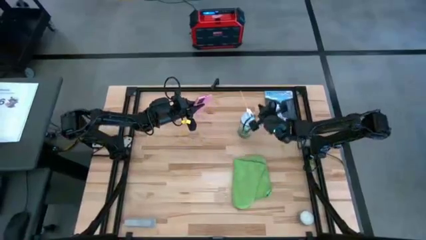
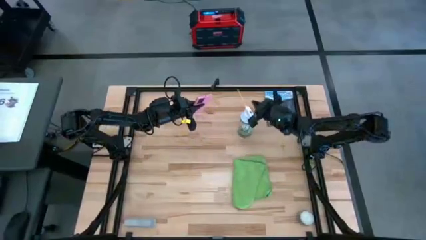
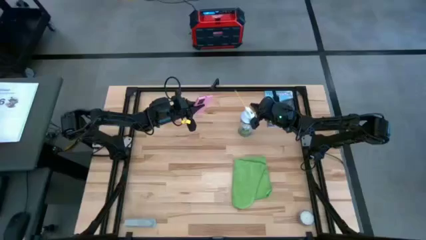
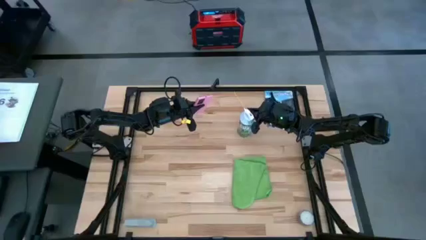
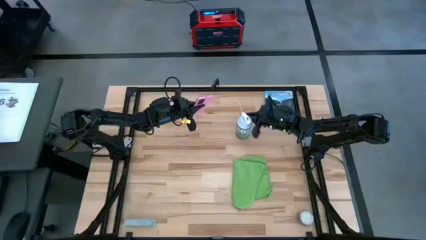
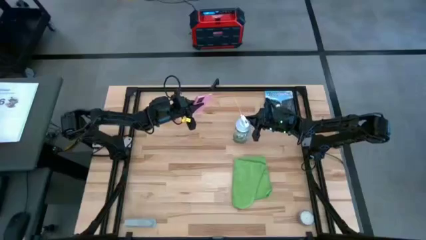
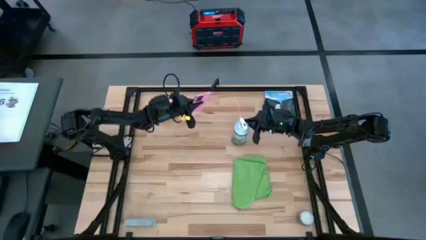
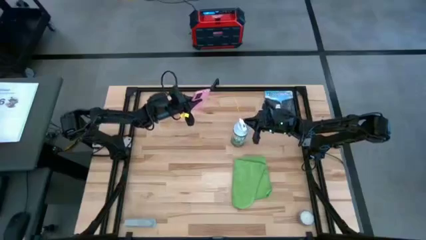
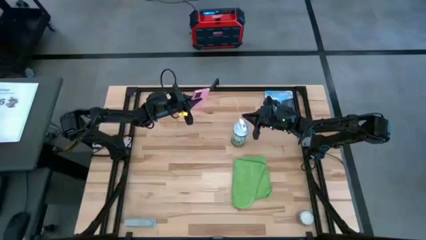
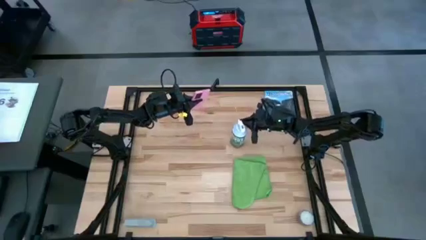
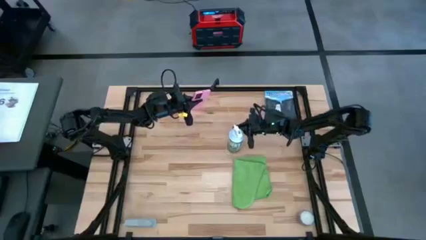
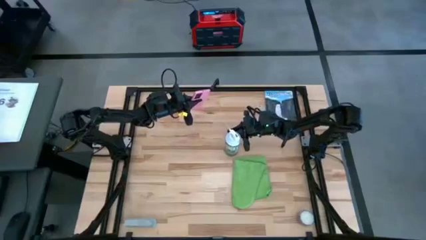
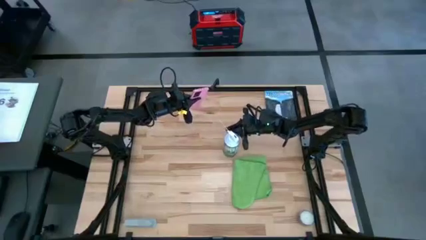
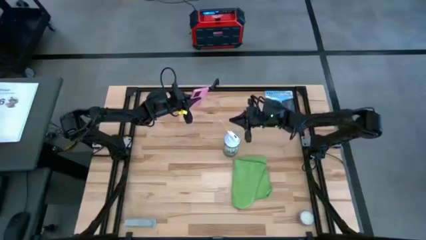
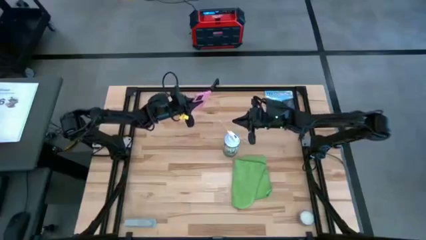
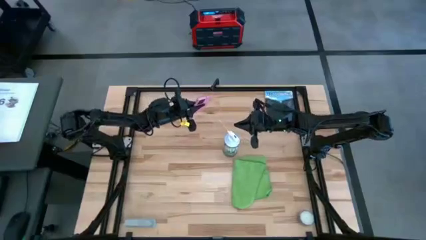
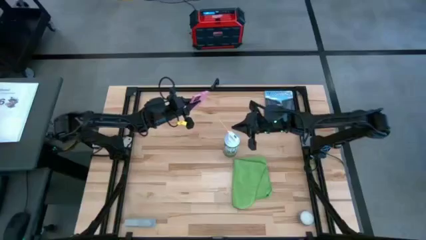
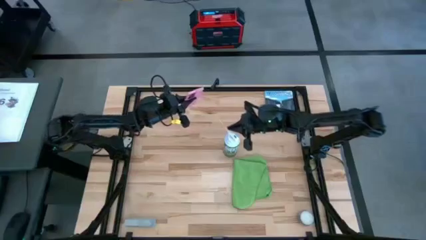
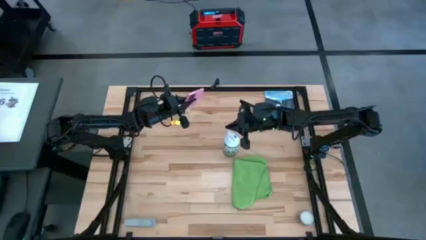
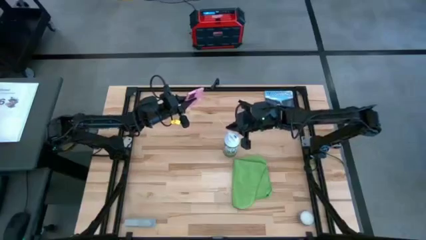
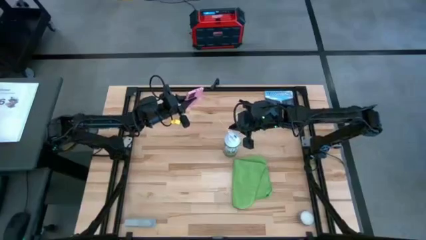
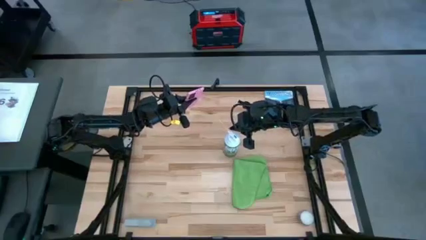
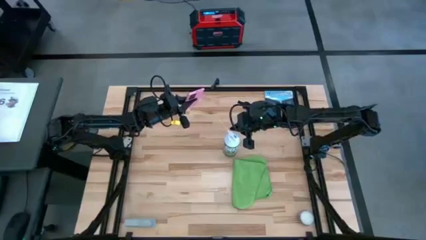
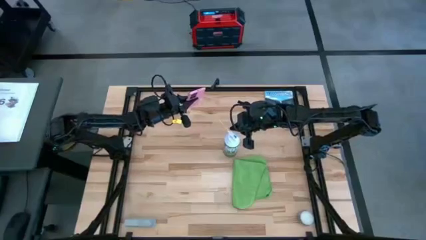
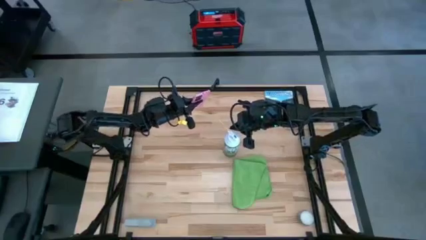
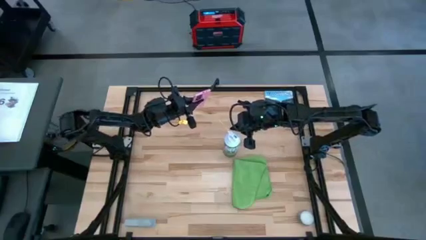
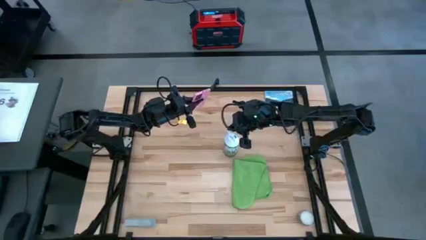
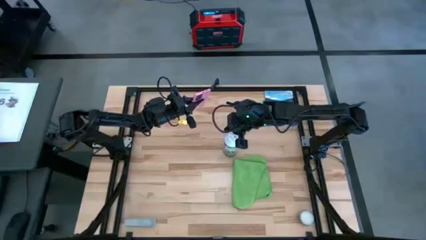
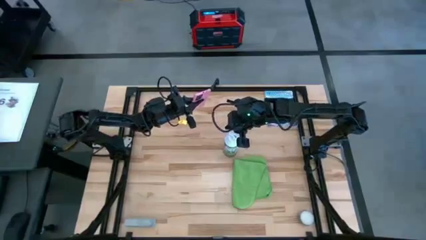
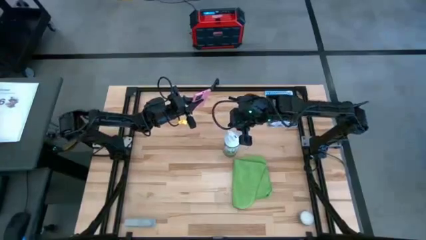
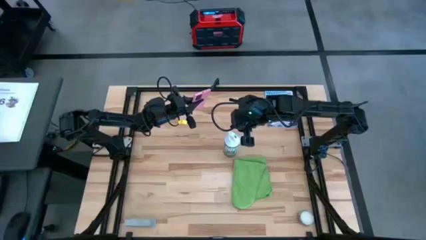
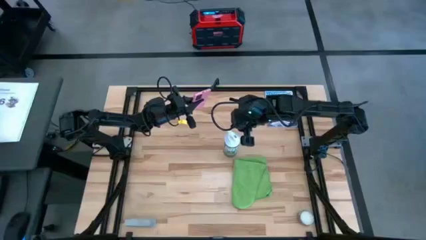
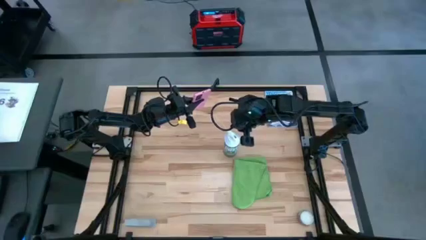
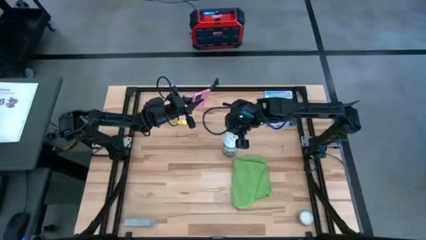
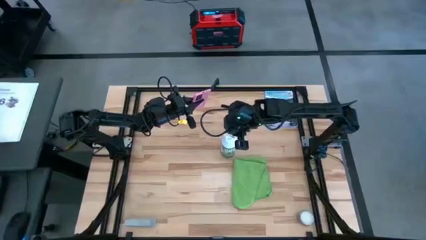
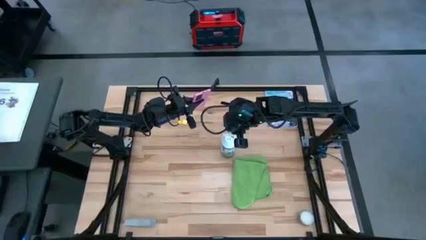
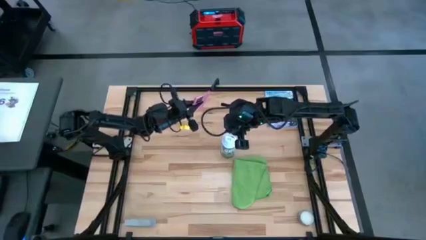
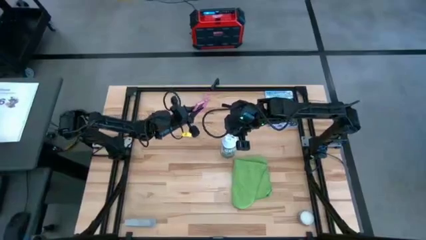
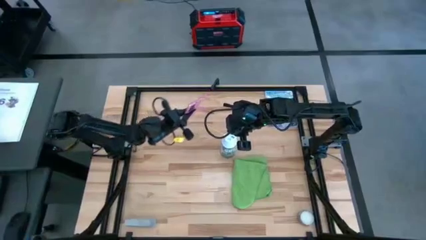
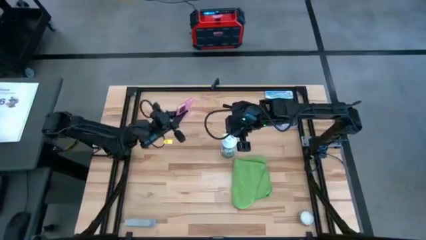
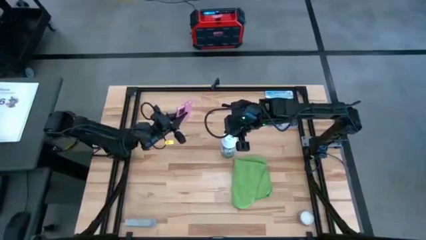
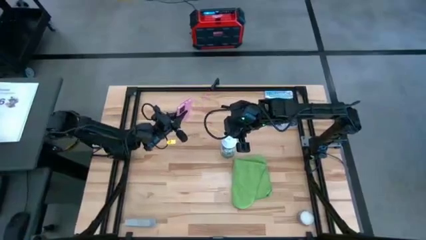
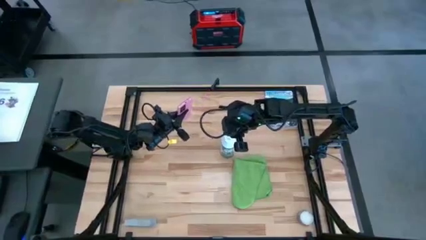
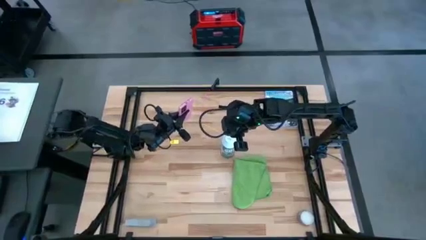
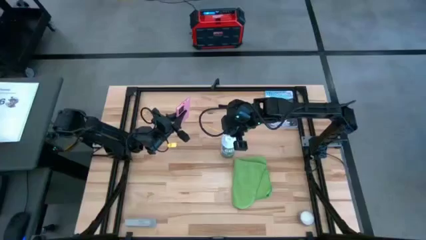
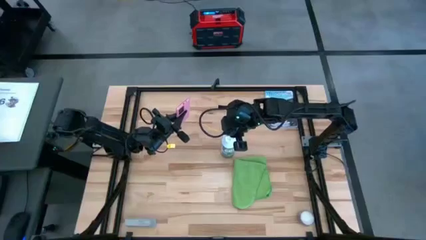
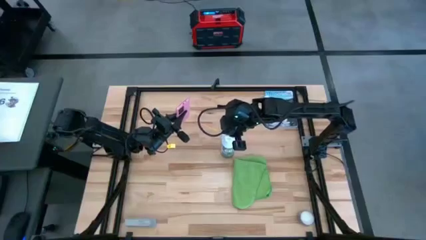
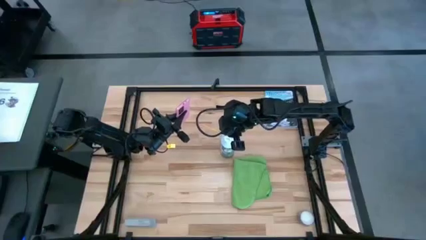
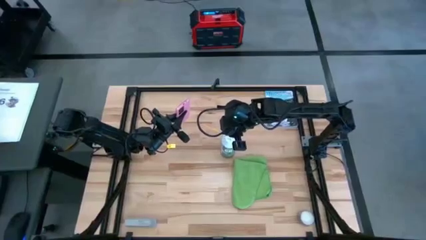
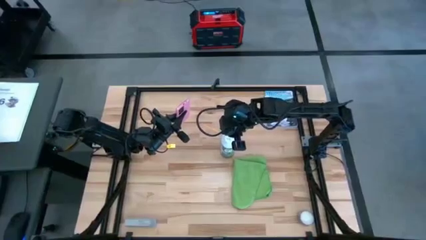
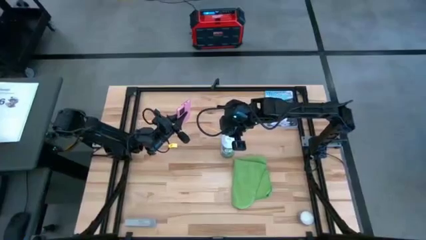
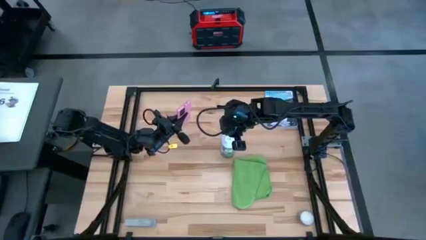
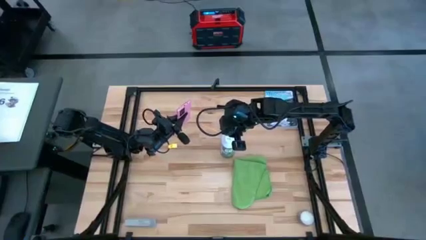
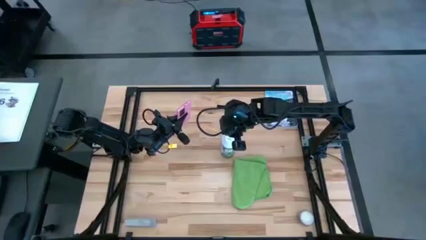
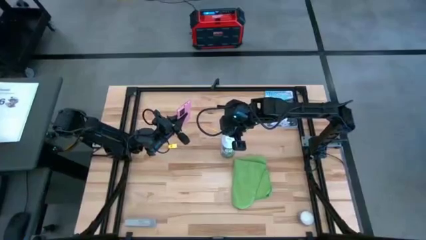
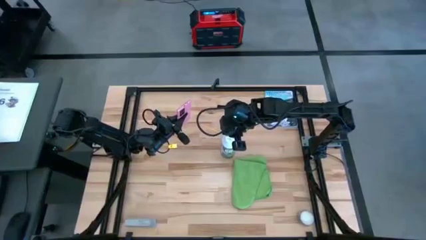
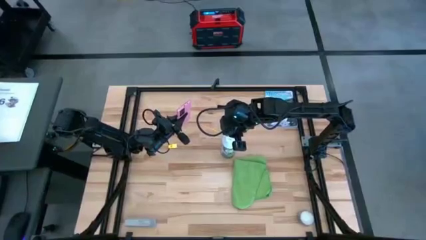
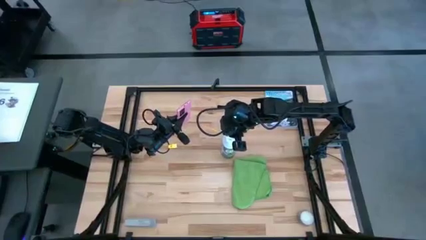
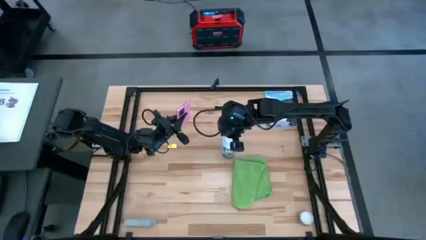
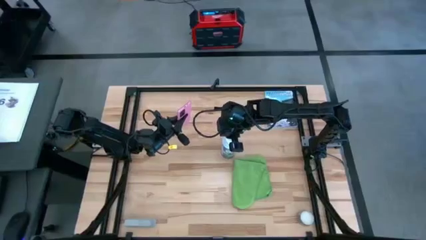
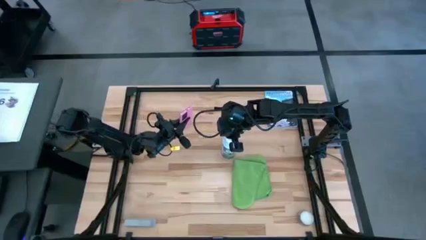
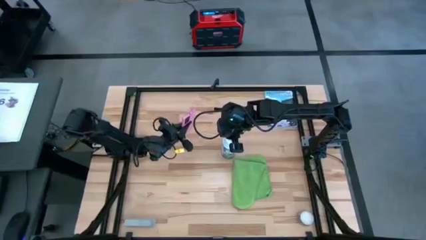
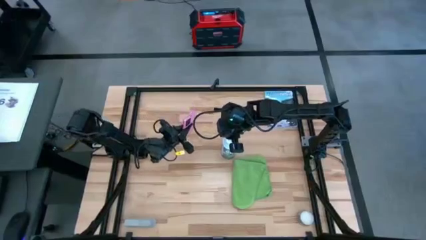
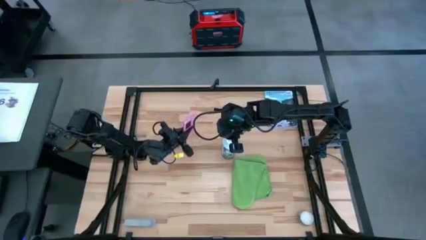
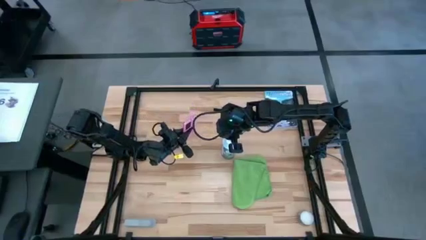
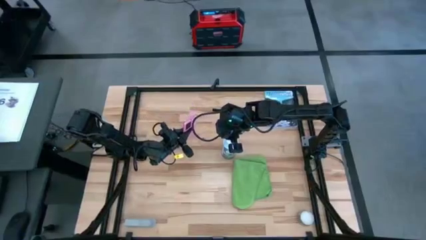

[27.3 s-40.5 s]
Task: Apply microfiber cloth
Spray the back of the pink phone using the white spray bottle
